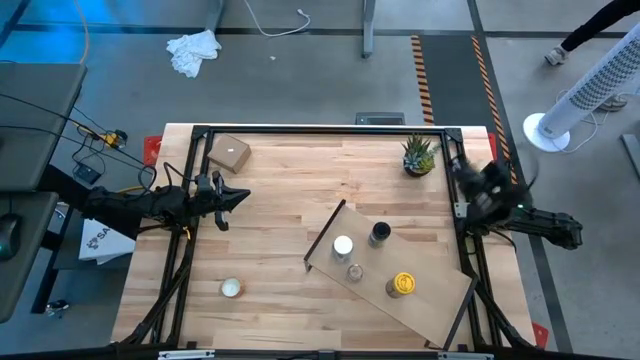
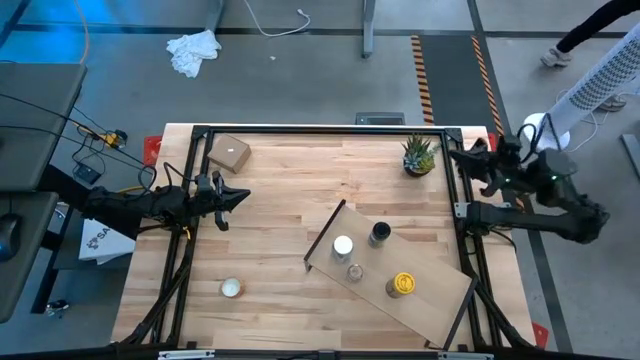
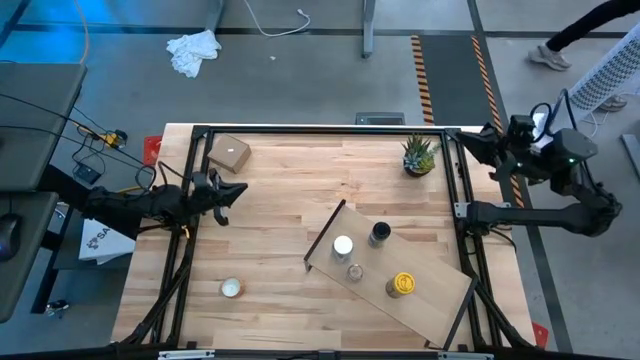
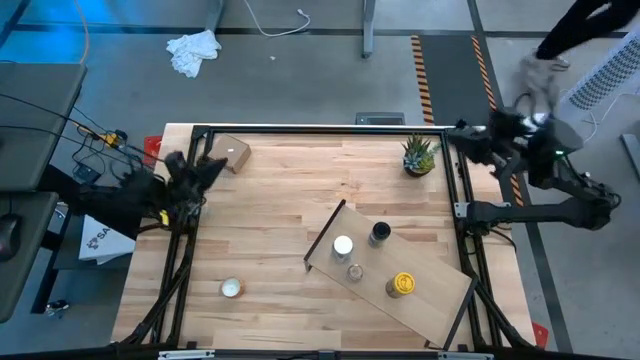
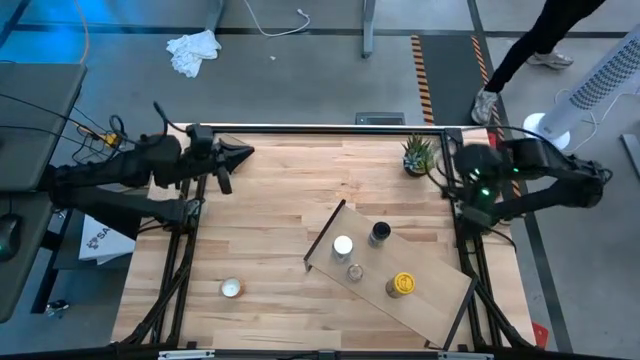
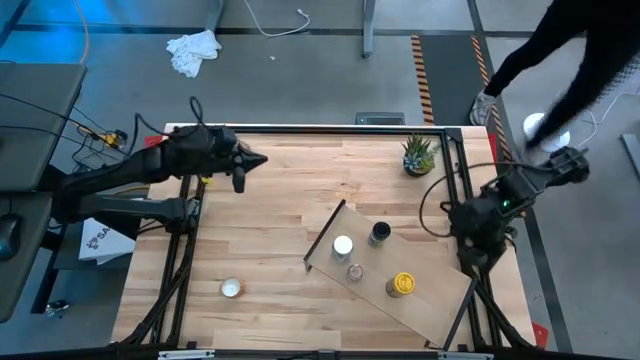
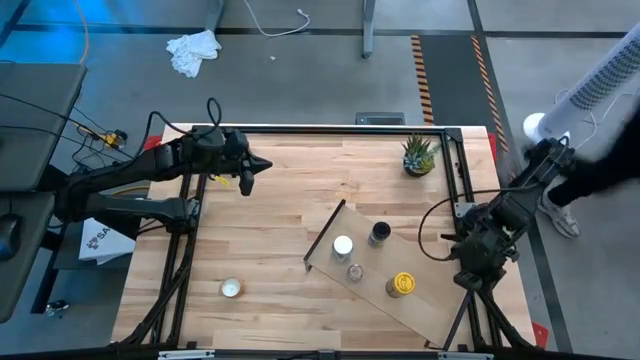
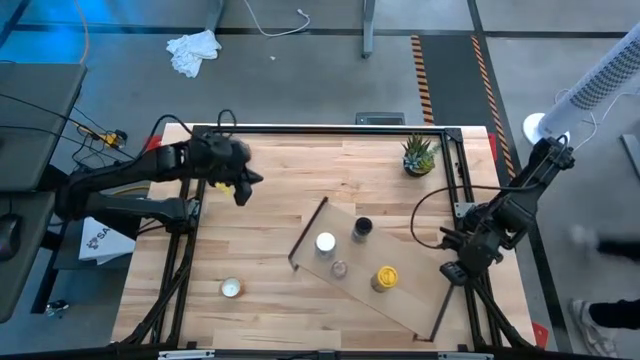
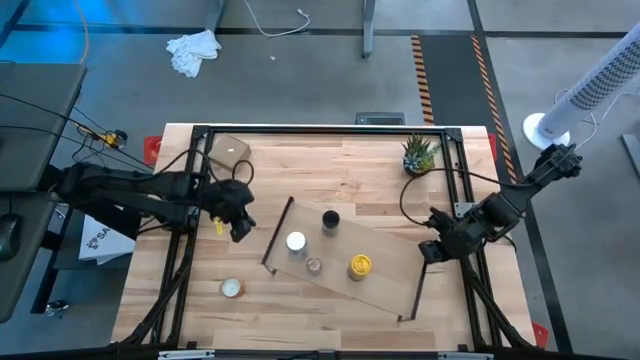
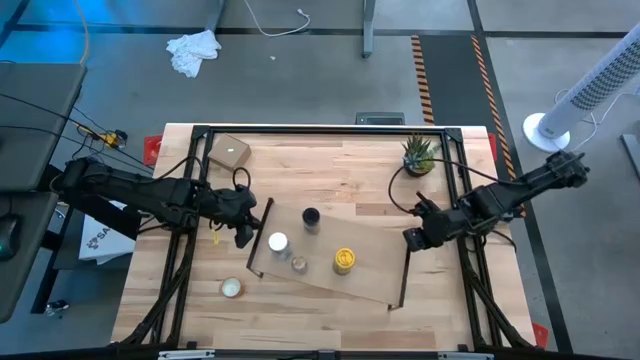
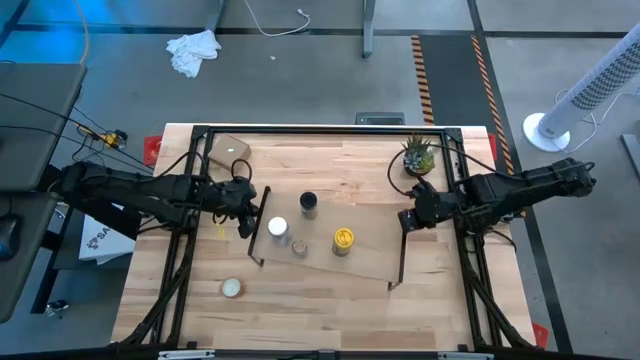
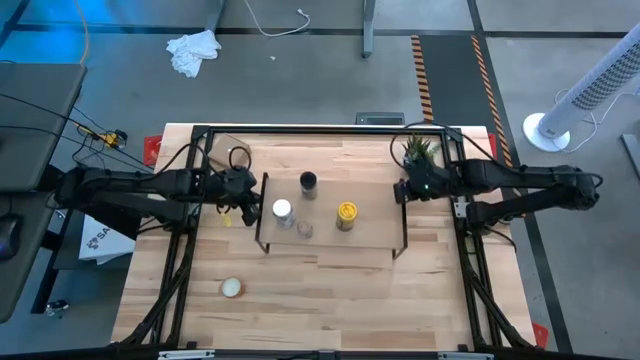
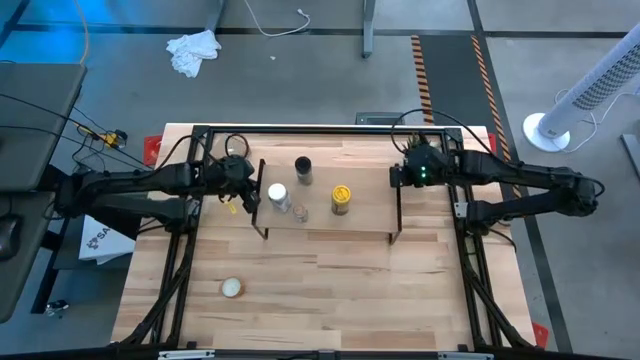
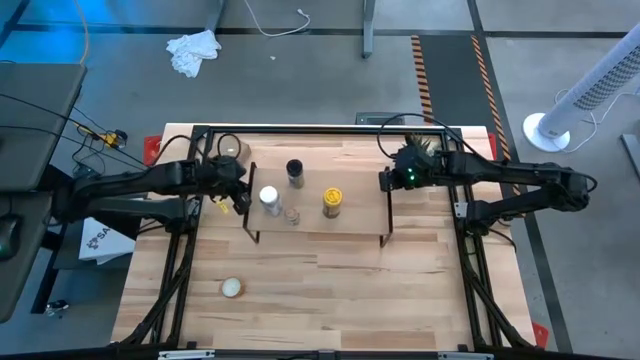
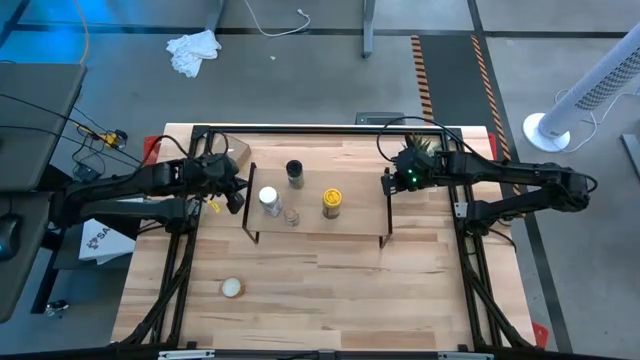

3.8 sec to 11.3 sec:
Task: Shelf spices
Move the shelf to the center of the table

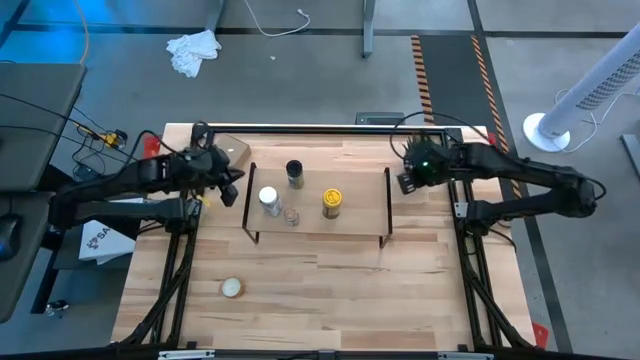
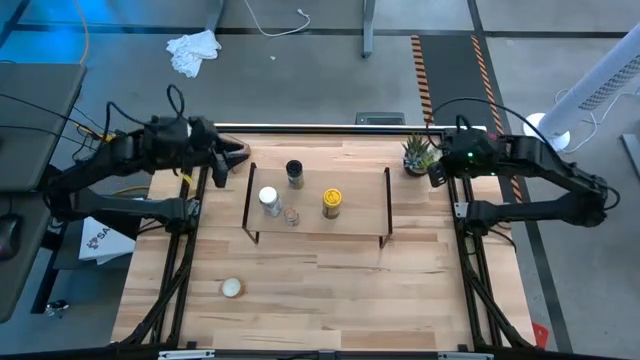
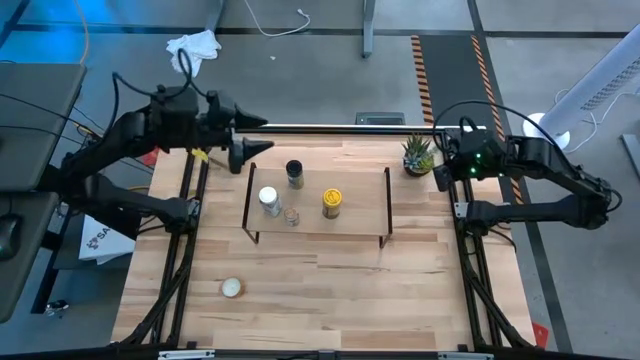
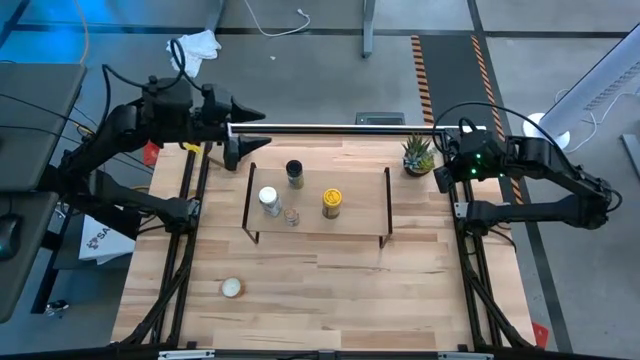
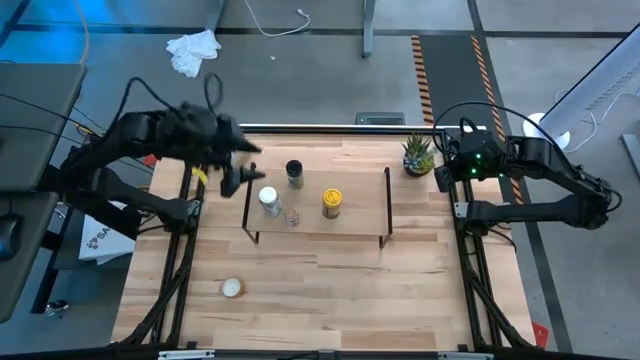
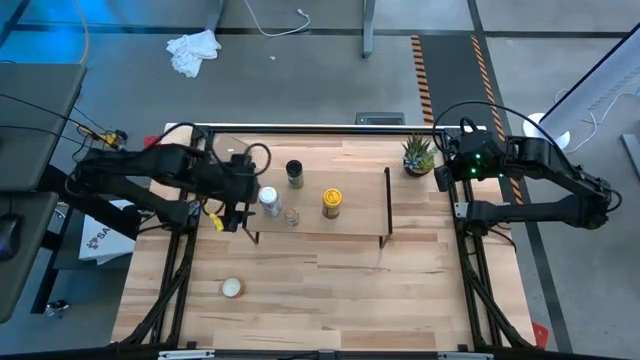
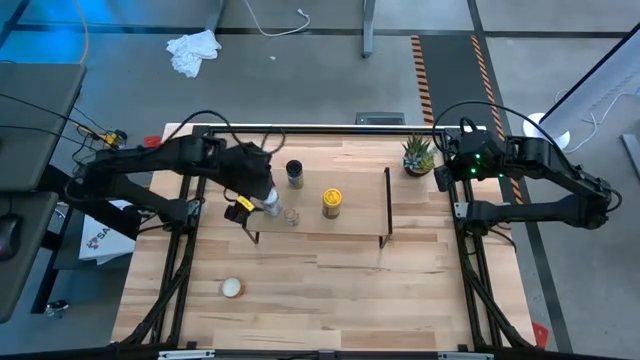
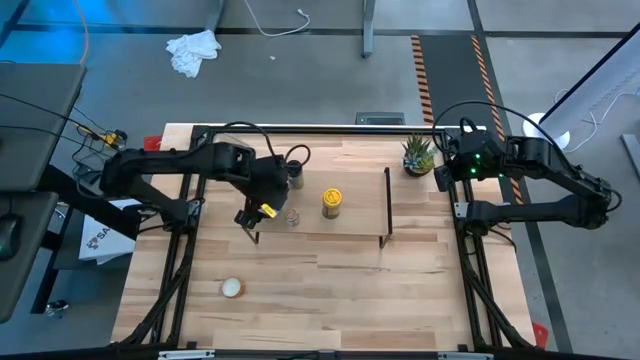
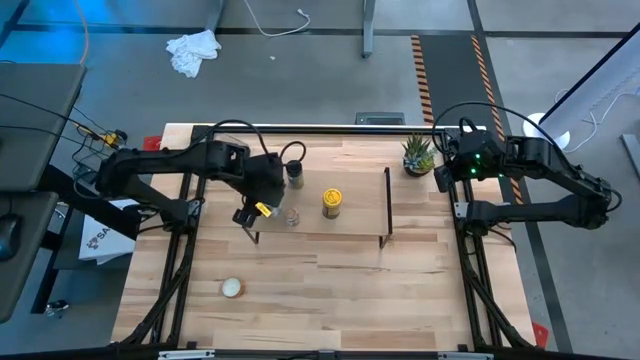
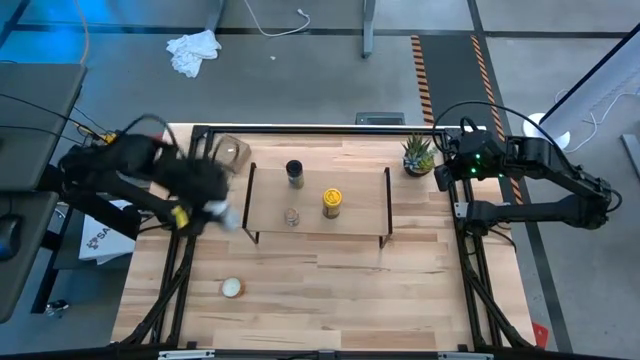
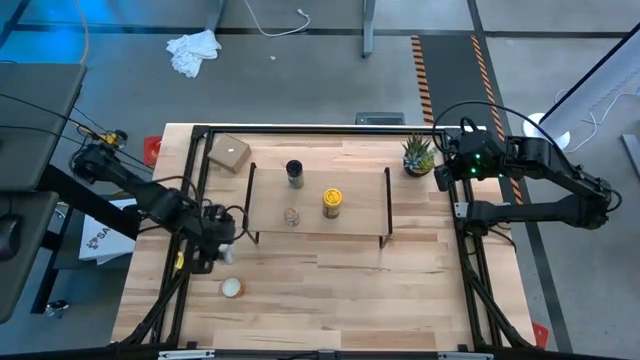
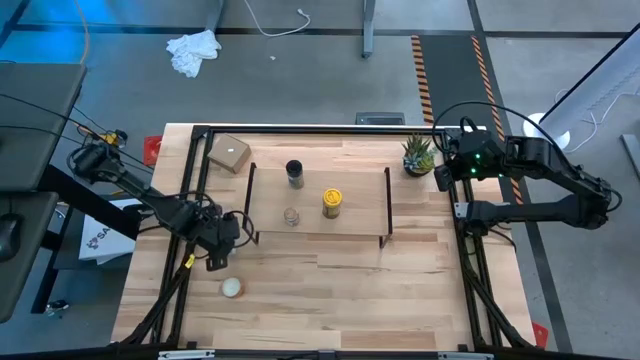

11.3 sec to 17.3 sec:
Remove the white seasoning bottle from the shelf

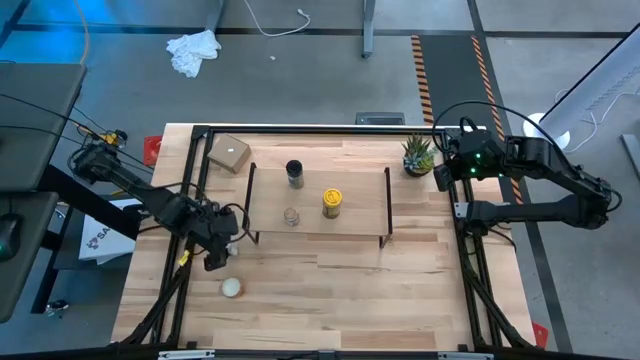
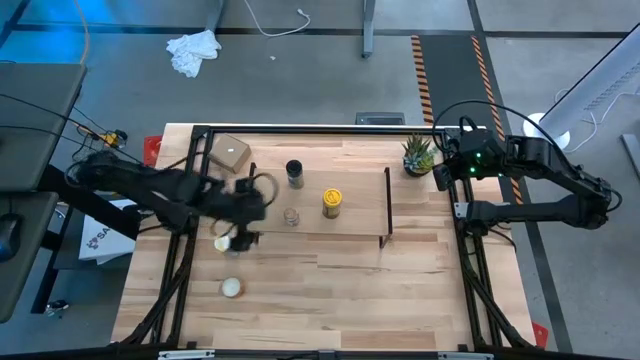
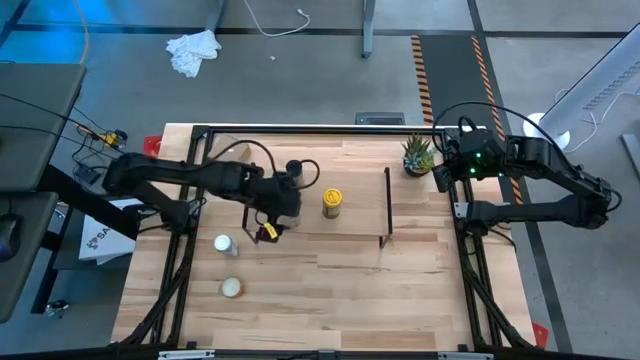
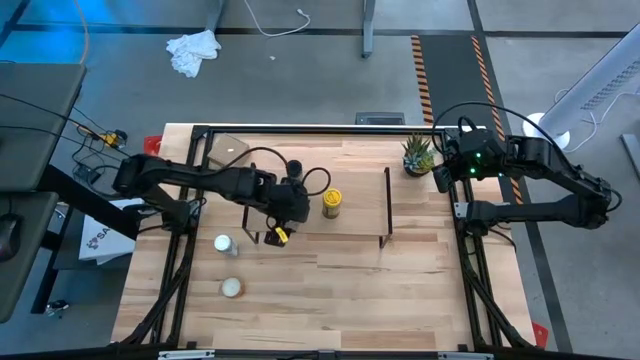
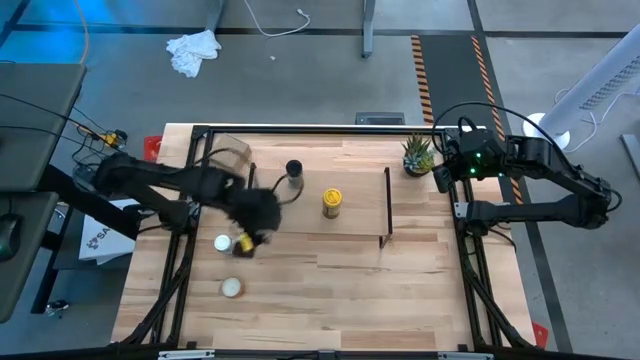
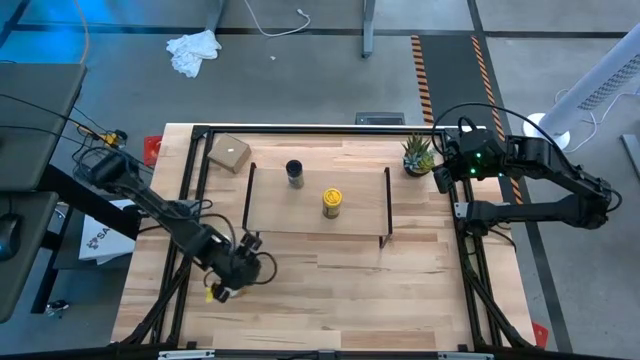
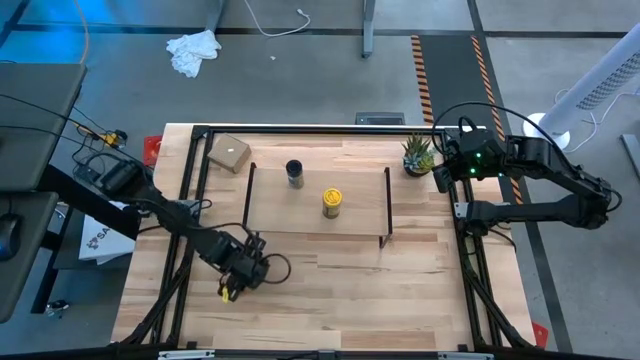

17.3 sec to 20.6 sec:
Remove the brown seasoning bottle from the shelf

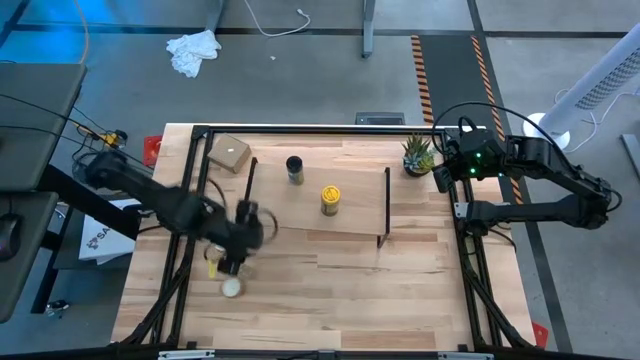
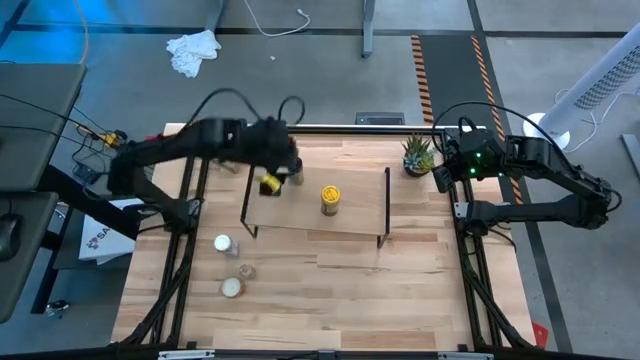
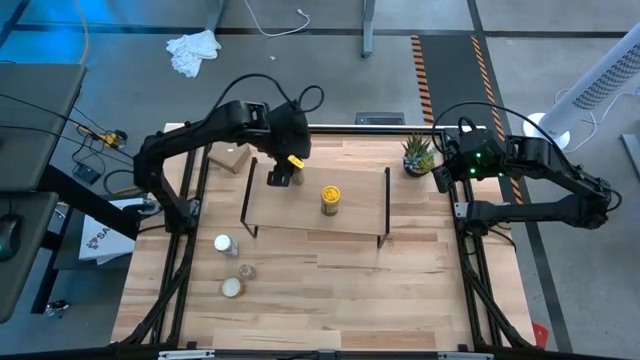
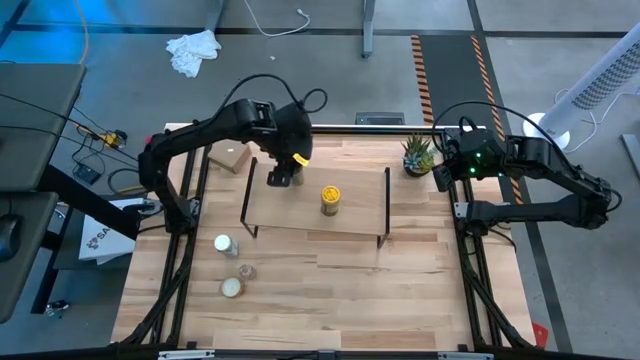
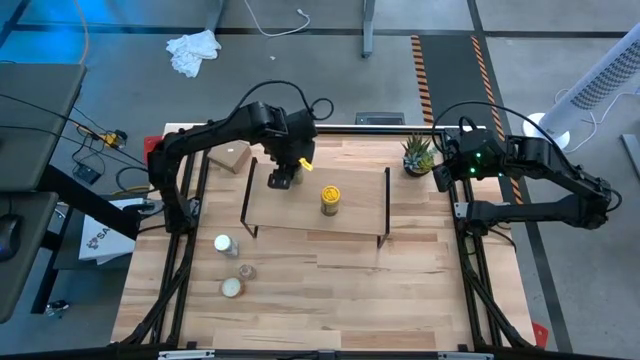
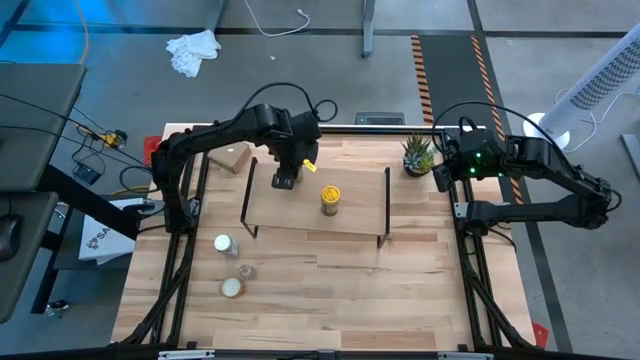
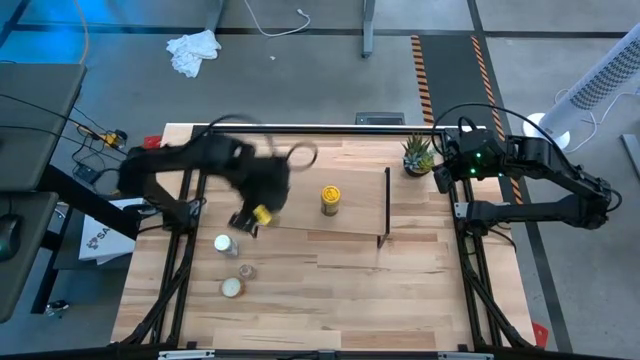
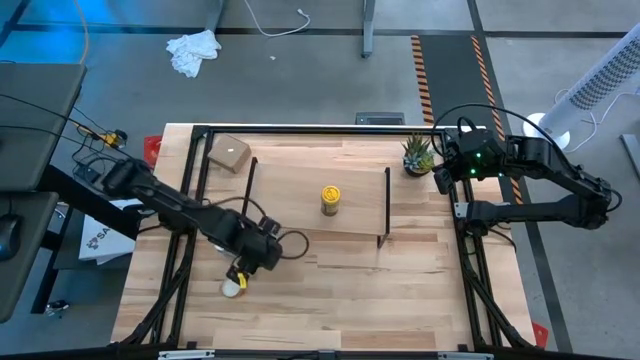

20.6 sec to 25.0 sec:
Remove the black seasoning bottle from the shelf
